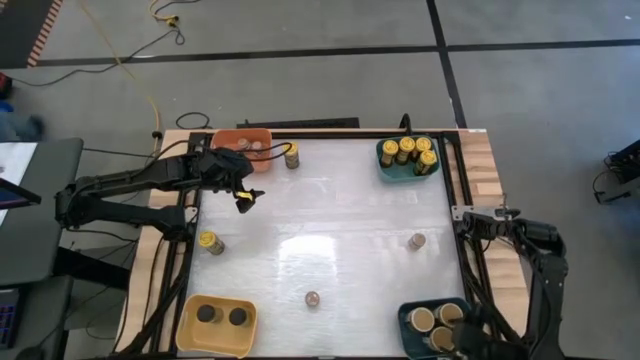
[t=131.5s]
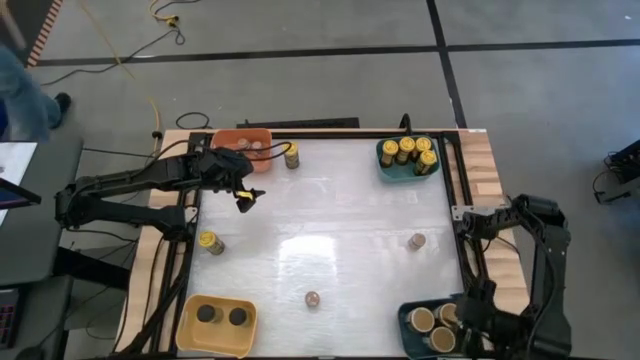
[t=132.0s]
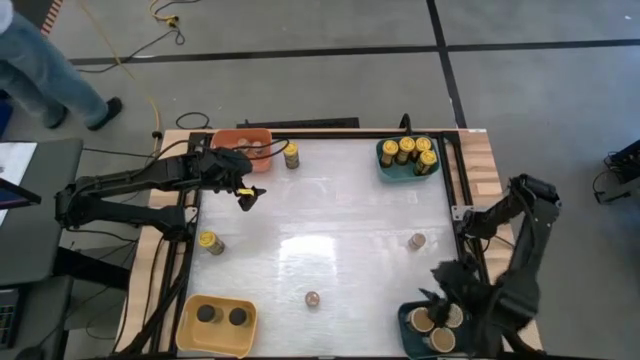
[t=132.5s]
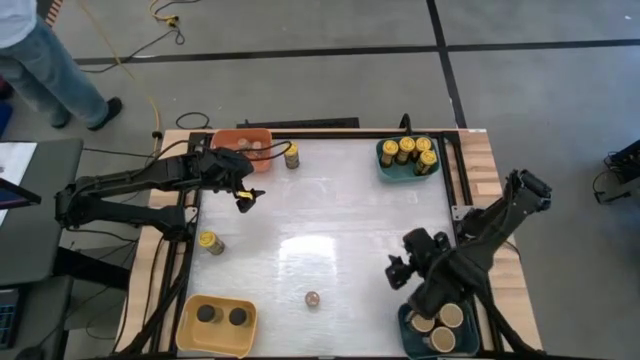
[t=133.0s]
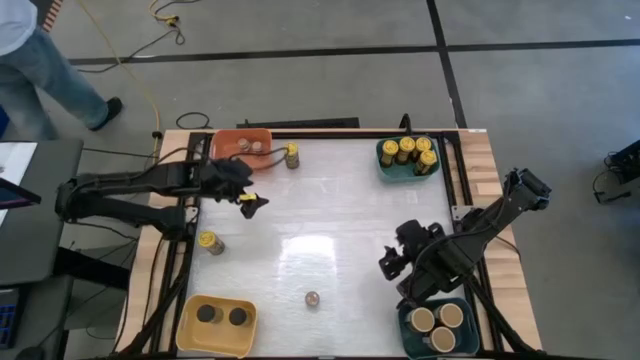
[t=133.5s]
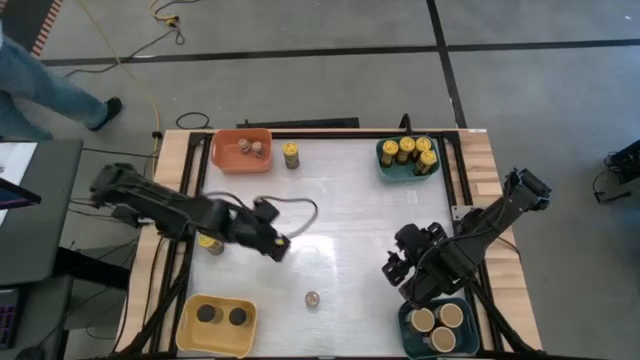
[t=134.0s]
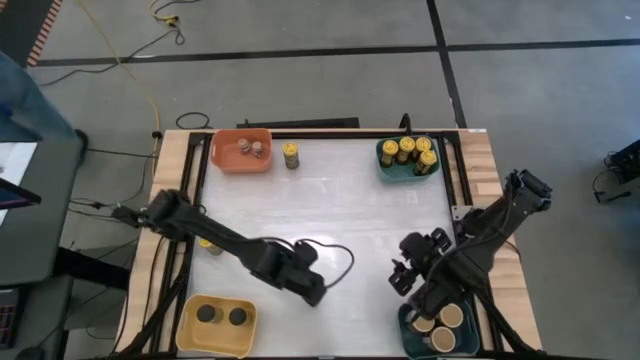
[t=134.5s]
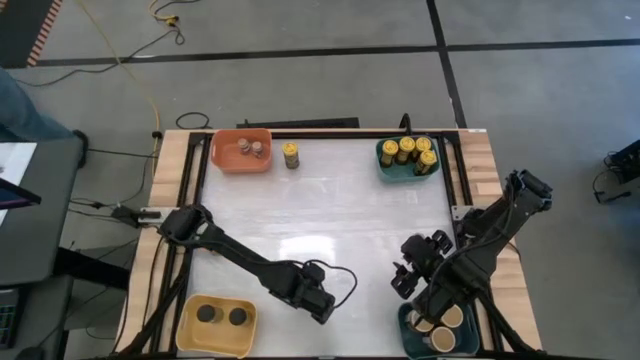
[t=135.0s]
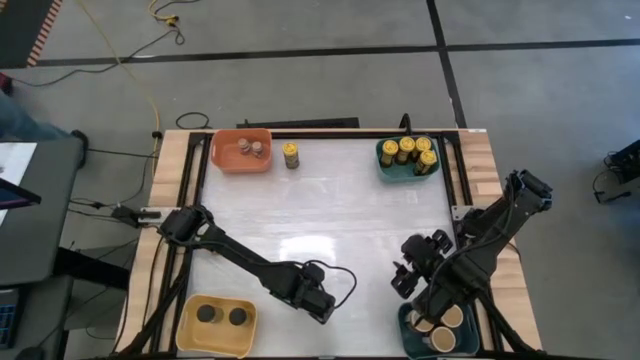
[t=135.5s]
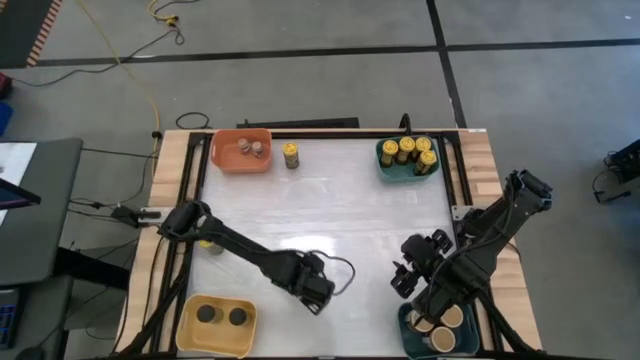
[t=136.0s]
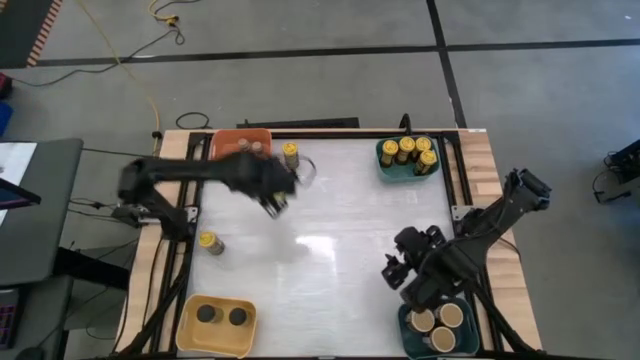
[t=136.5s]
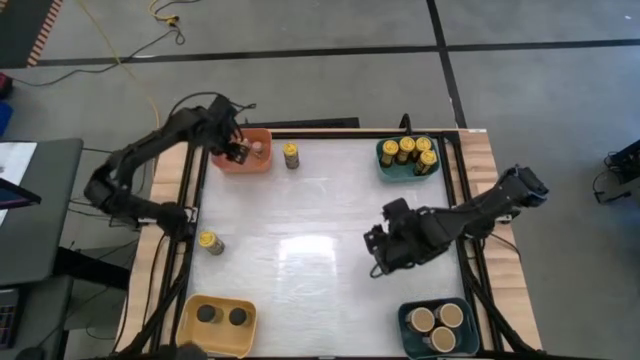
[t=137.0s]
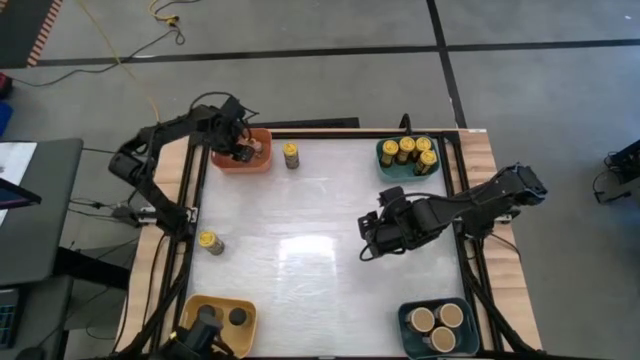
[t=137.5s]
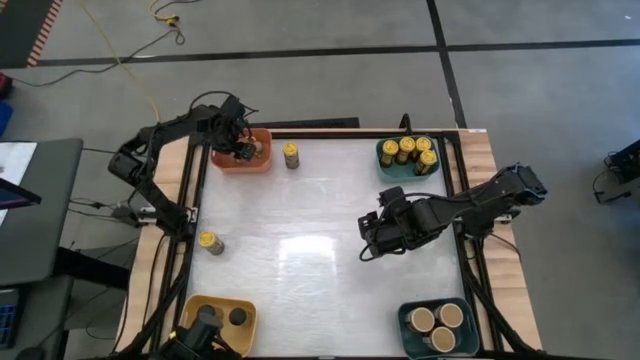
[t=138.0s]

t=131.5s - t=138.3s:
Task: Sort spices by type
Put the bottom brown small seasoning bottle into the orange bin

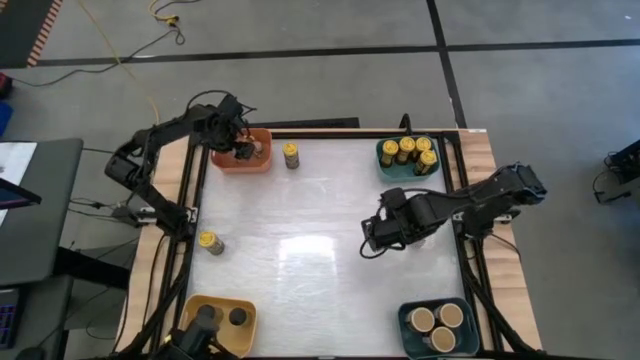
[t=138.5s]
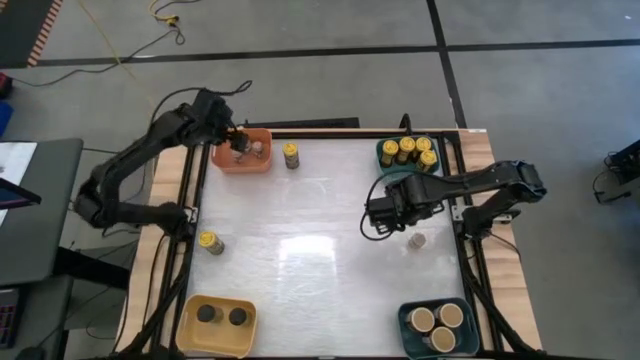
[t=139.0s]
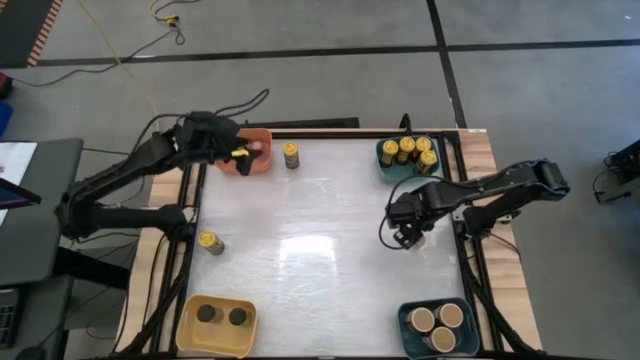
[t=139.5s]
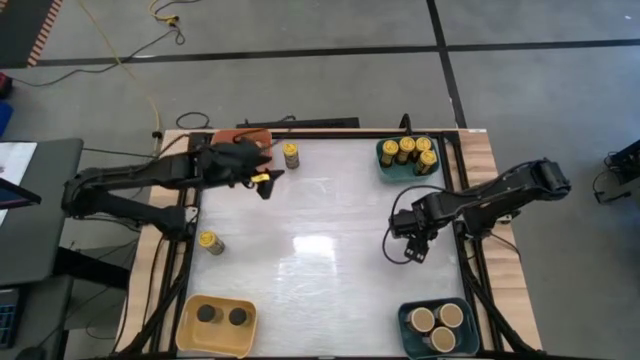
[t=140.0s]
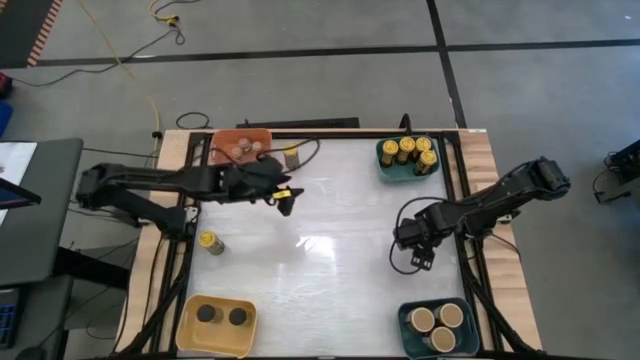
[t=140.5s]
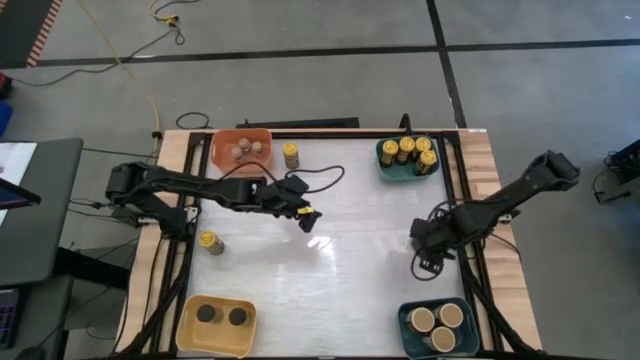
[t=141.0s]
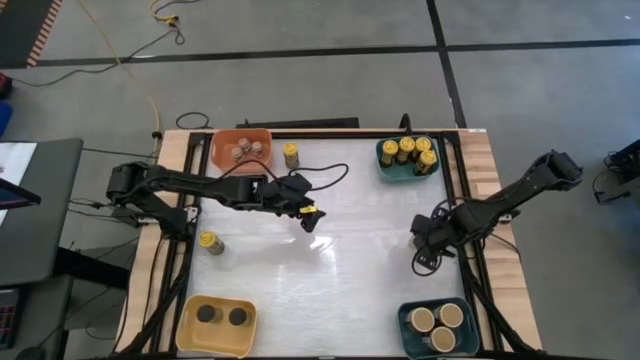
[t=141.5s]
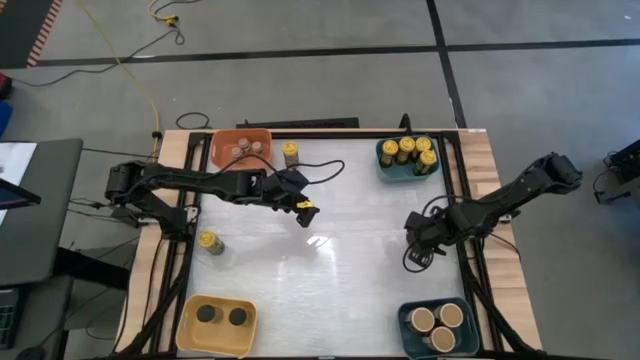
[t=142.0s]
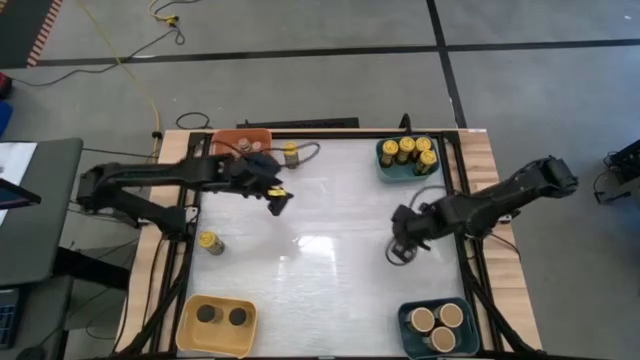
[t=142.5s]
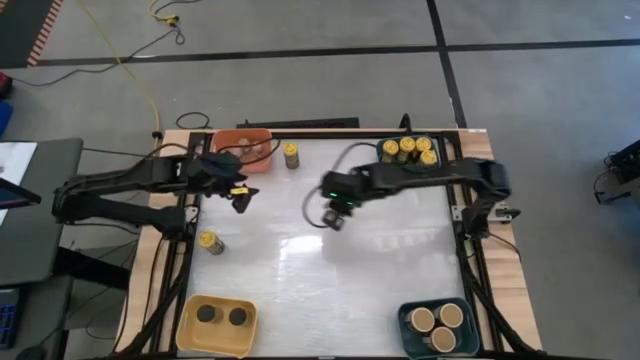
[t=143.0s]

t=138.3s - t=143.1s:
Put the brown small seasoning bottle into the orange bin

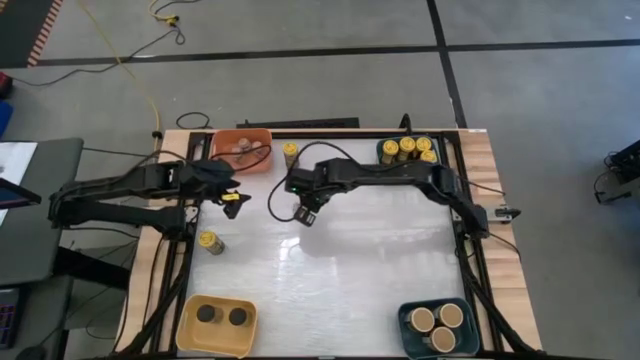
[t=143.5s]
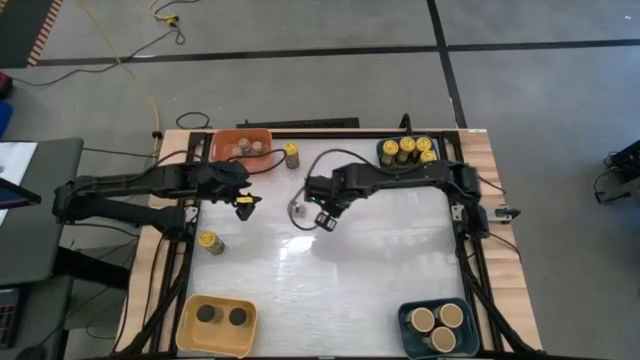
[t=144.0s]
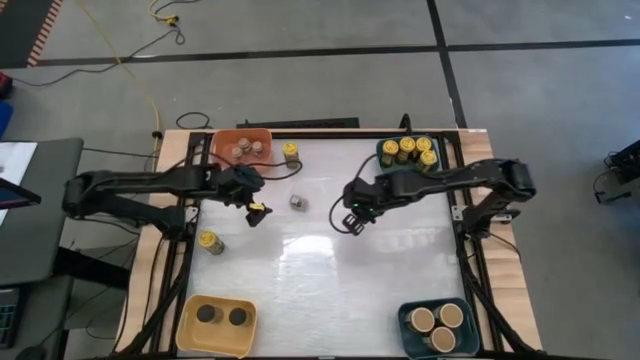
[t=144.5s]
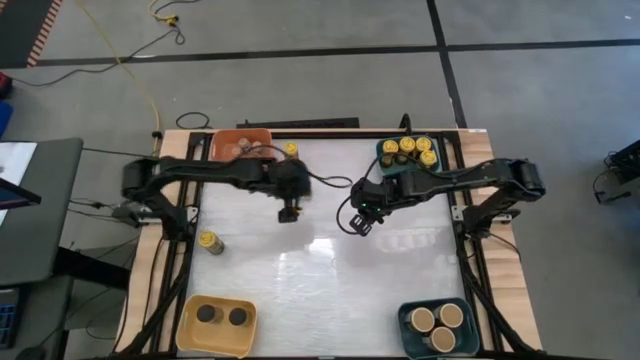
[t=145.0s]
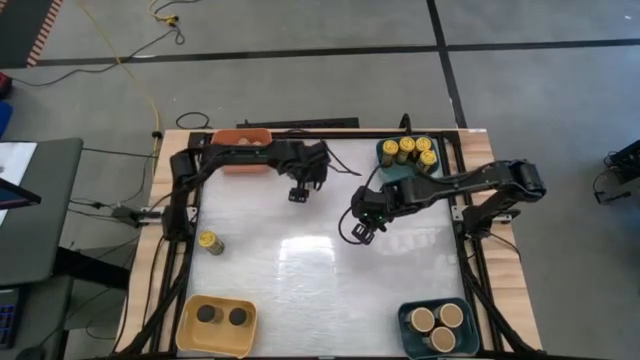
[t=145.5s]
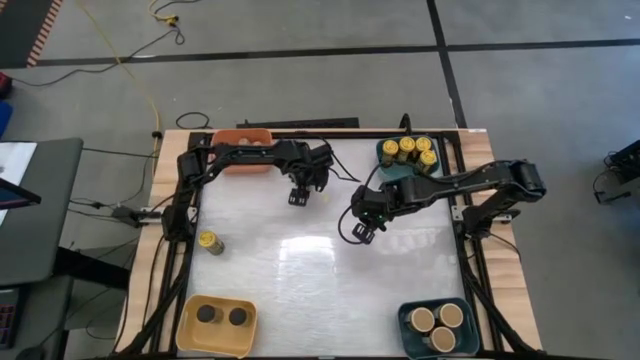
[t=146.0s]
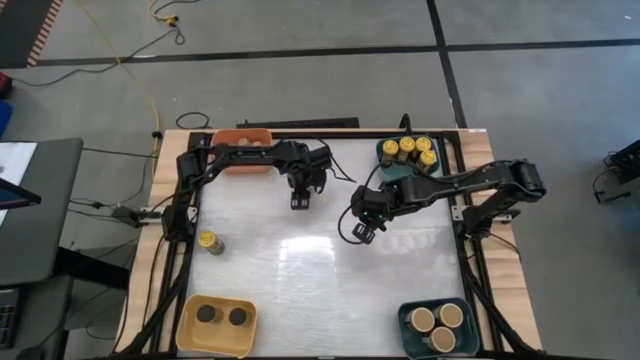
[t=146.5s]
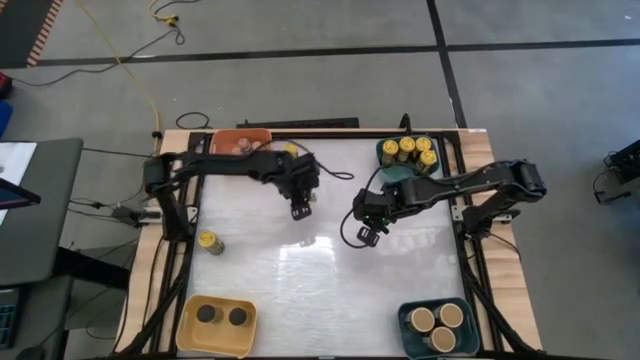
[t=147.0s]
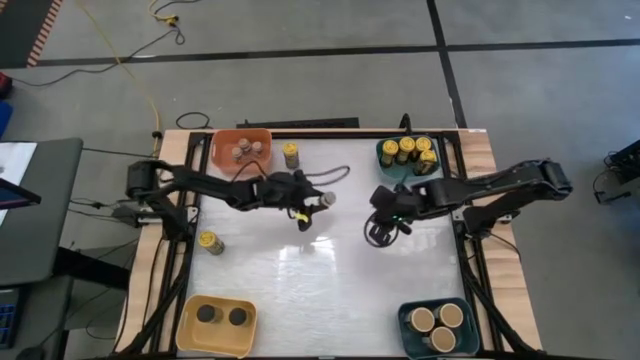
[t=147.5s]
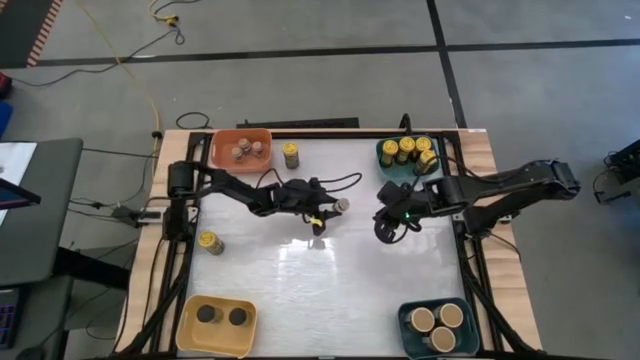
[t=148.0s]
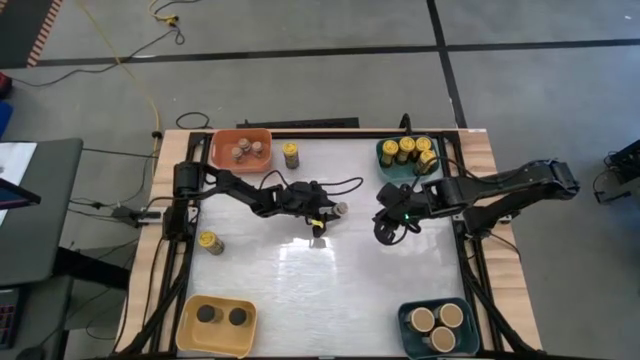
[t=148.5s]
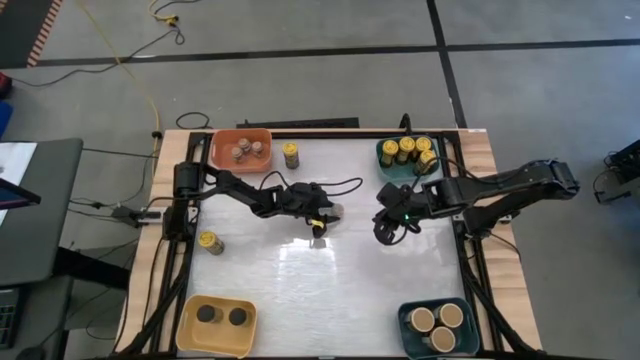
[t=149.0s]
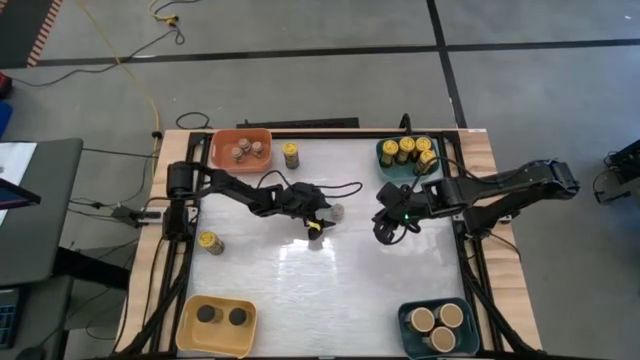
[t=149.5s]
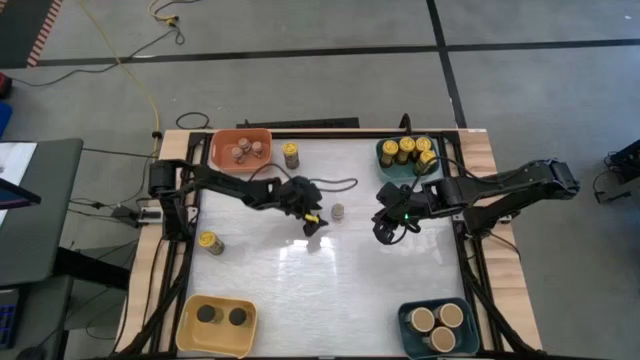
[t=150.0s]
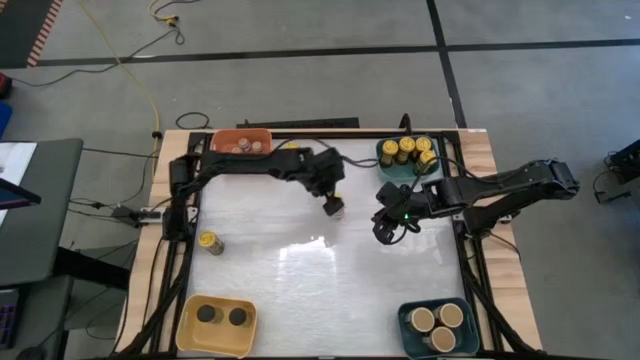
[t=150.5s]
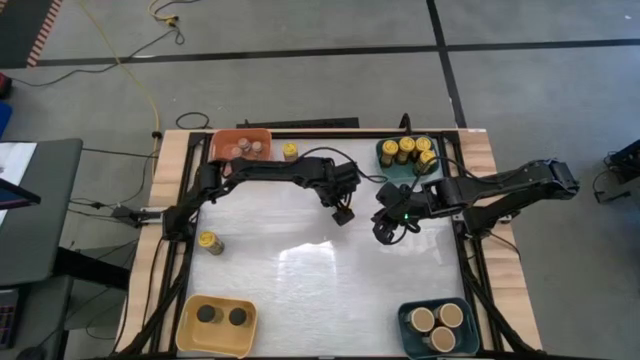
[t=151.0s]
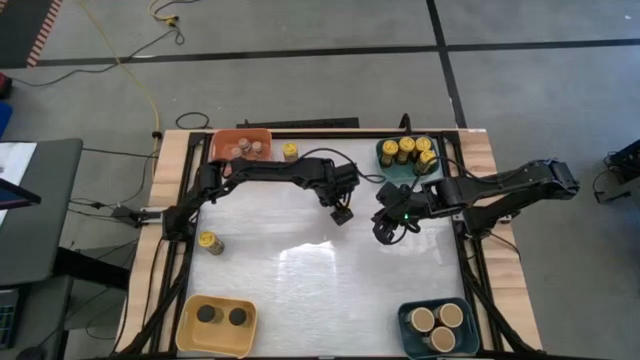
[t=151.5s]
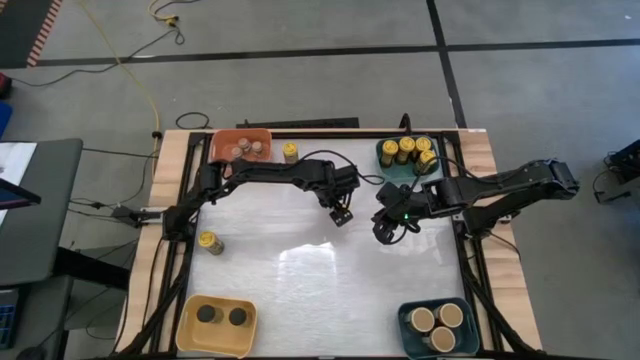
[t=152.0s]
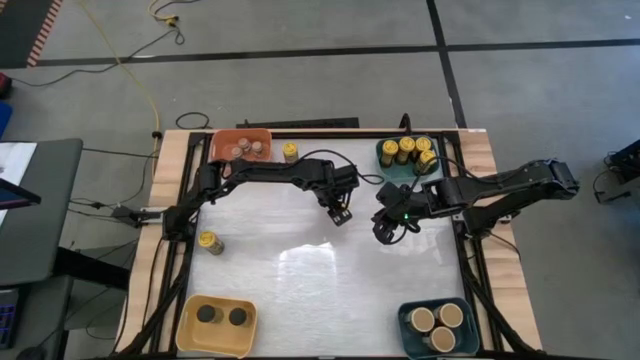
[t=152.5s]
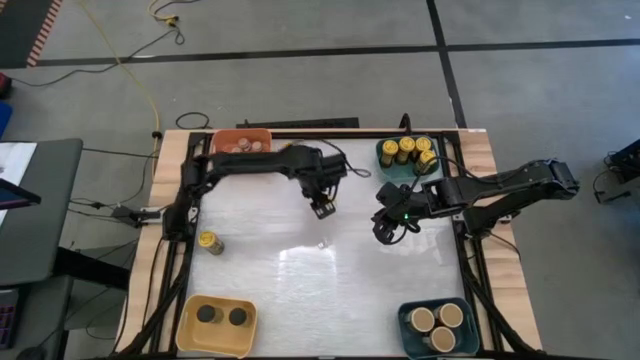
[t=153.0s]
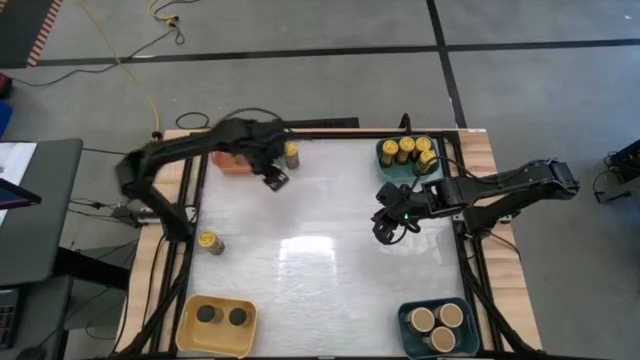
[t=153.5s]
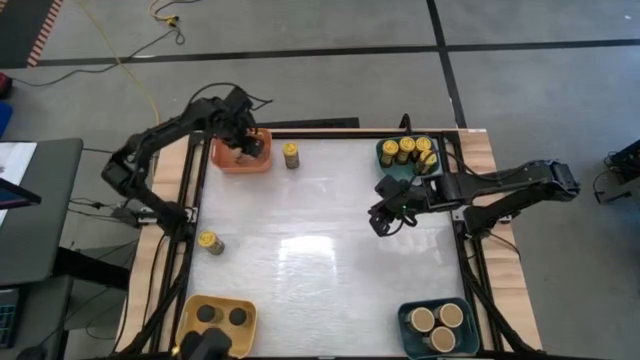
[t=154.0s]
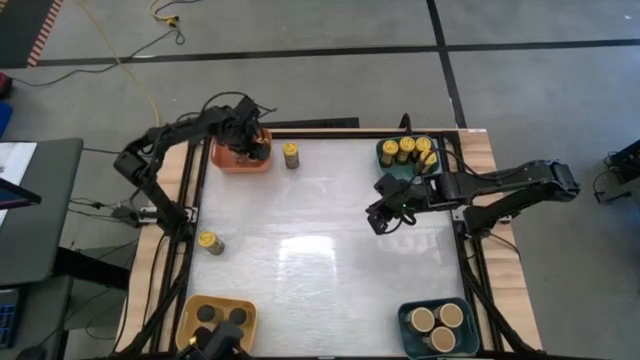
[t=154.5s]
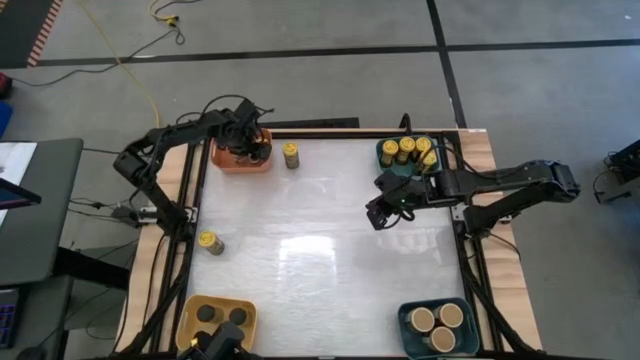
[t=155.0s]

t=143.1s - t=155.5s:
Put the brown small seasoning bottle into the orange bin
